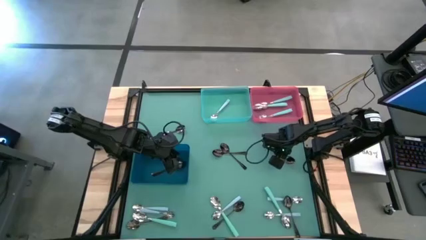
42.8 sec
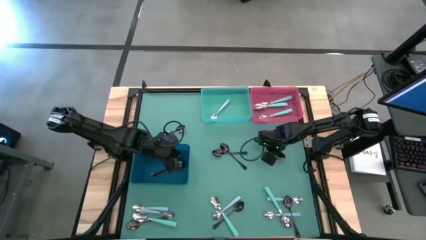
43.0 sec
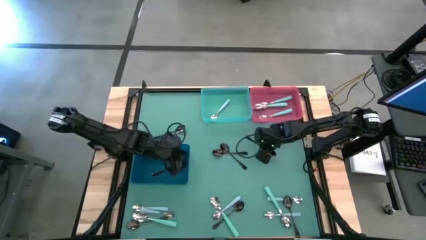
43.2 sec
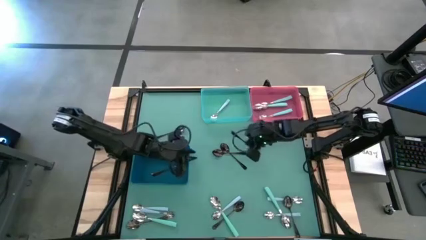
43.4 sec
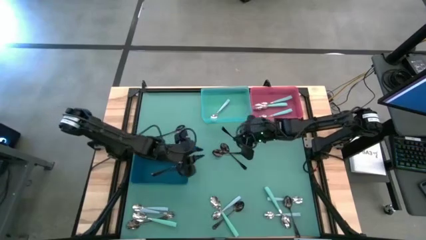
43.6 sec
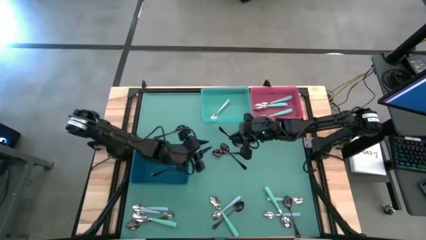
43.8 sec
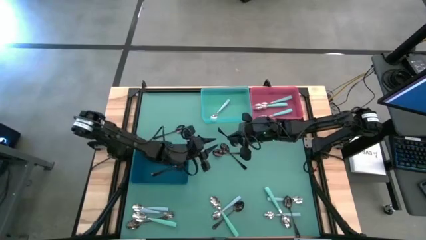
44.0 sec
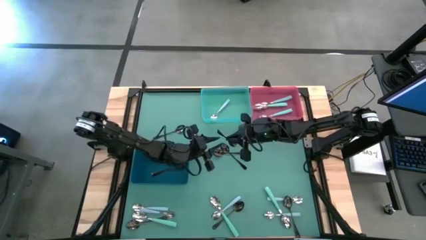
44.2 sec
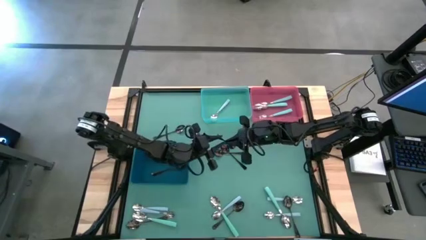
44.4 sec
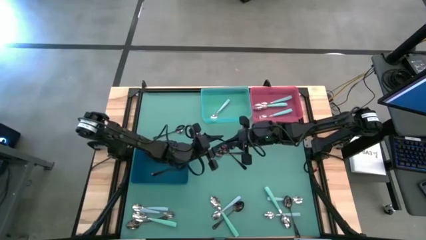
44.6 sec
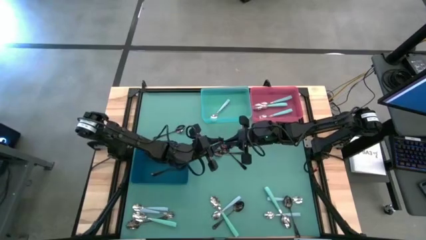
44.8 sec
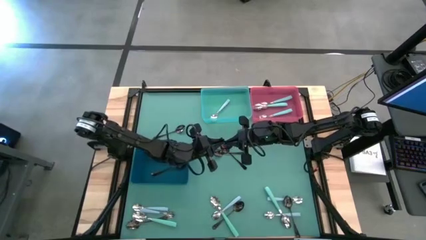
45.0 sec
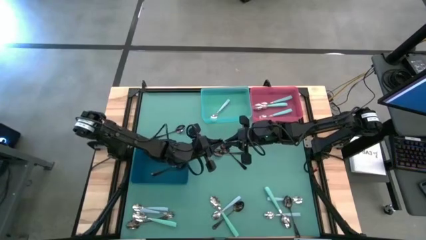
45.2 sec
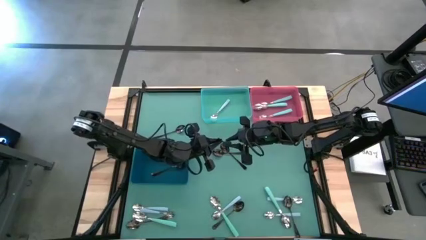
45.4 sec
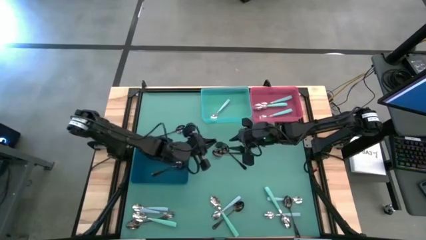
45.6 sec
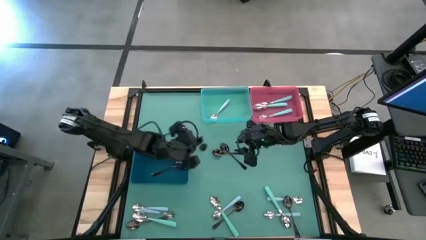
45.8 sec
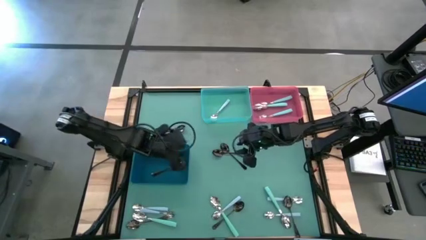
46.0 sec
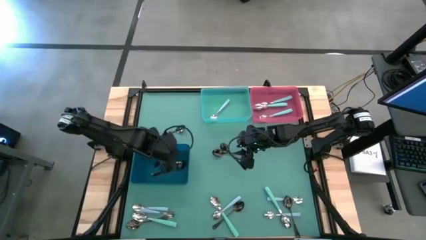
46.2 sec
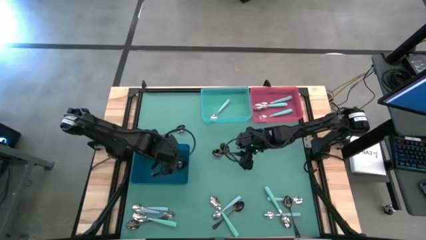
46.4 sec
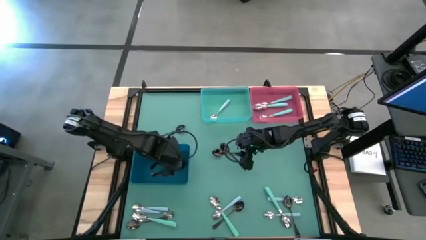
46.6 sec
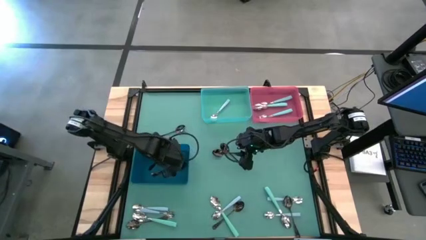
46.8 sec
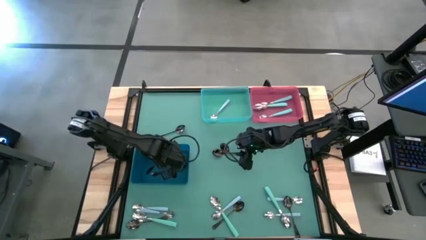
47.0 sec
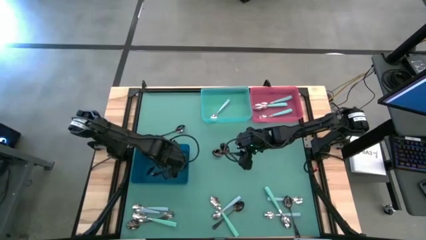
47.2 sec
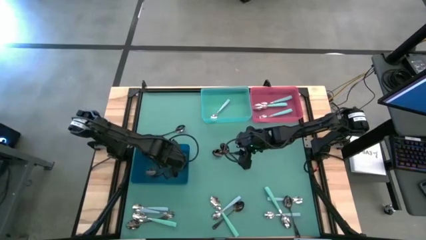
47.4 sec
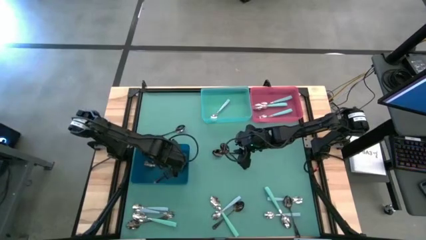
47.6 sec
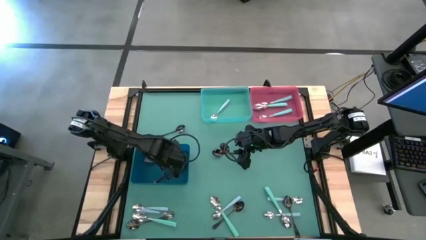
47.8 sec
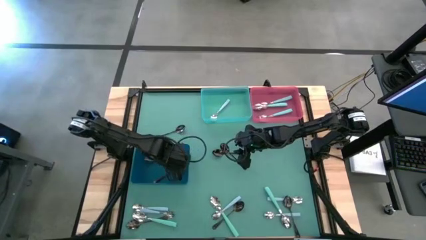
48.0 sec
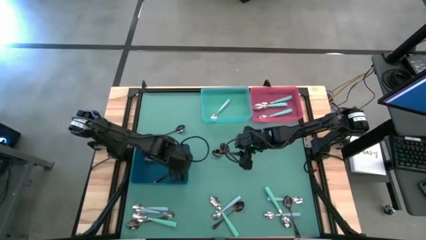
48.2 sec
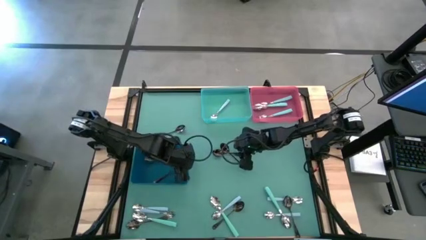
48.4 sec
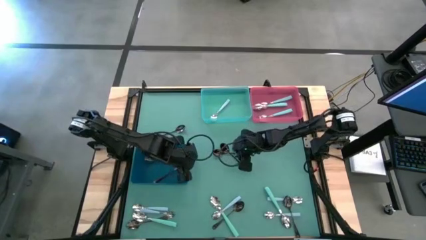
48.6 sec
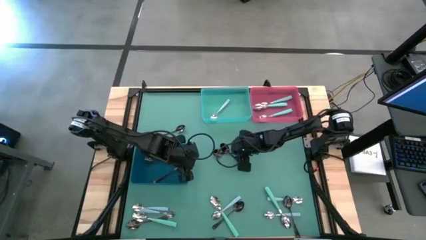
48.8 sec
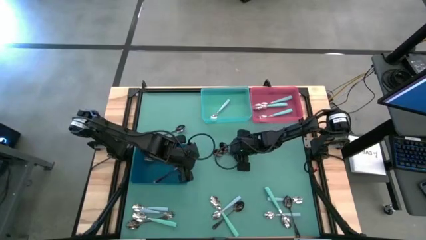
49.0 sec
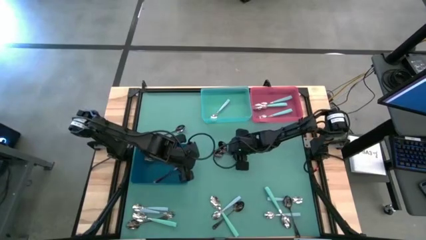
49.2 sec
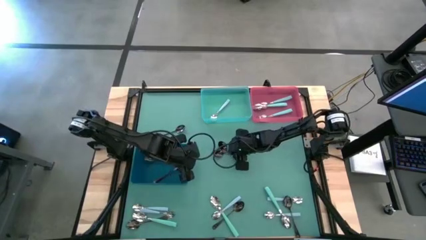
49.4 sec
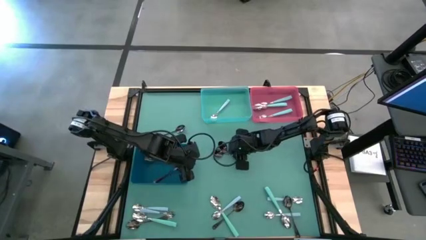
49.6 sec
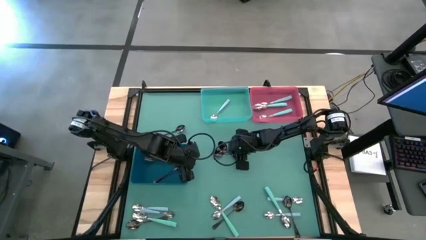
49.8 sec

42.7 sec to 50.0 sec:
Task: Sort silverware by color (type)
Put the center right black spoon into the dark blue bin

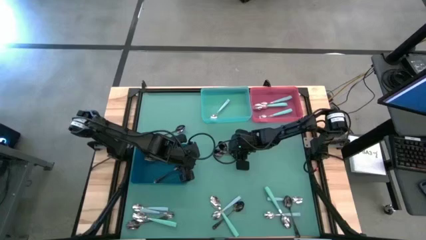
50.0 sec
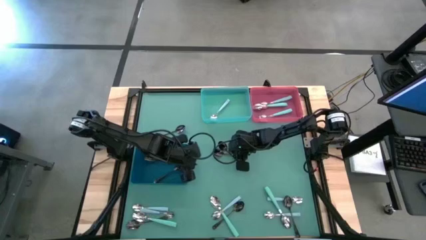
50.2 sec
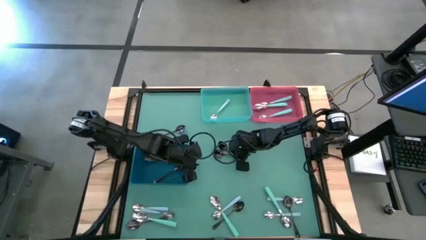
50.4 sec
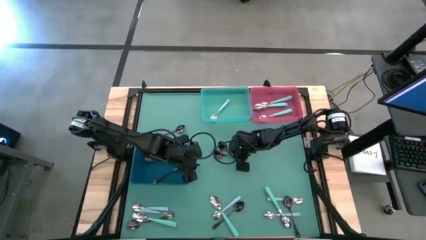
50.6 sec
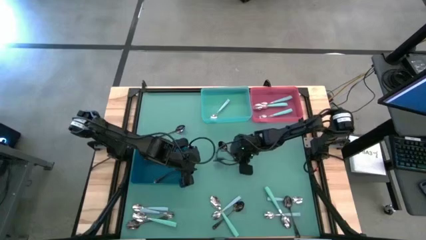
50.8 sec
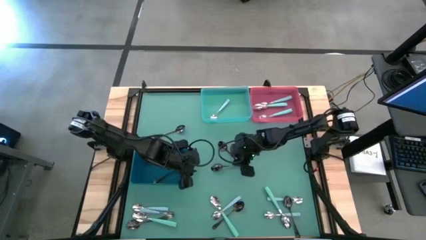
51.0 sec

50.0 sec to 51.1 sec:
Put the center black spoon into the dark blue bin

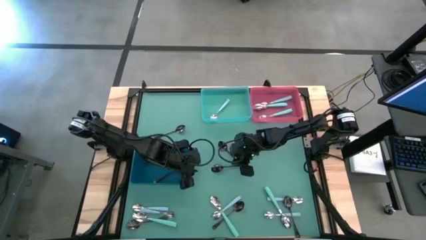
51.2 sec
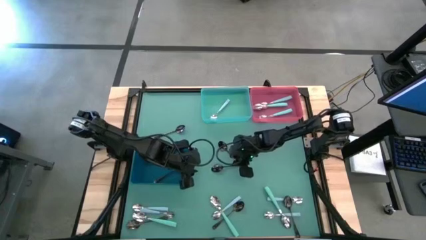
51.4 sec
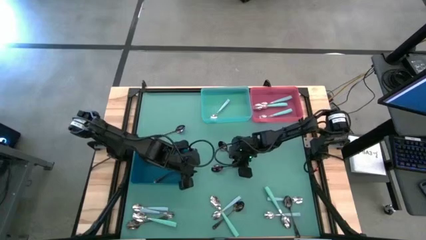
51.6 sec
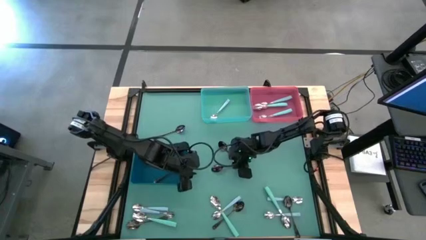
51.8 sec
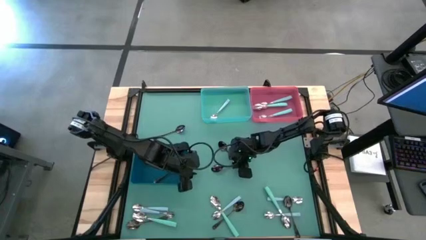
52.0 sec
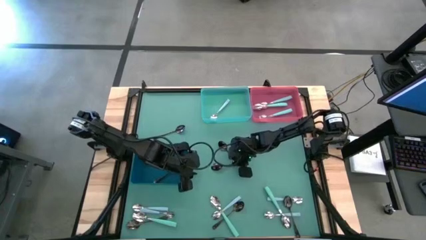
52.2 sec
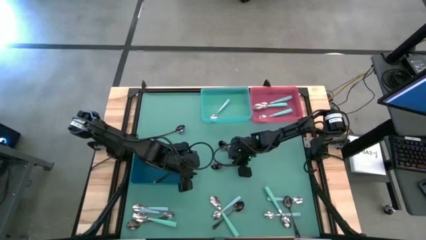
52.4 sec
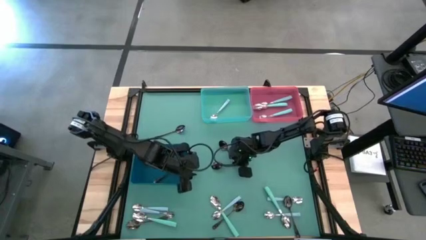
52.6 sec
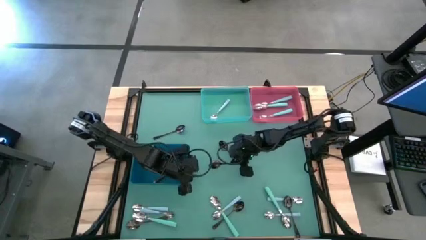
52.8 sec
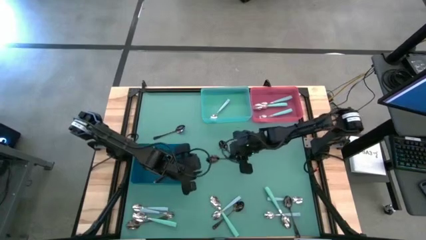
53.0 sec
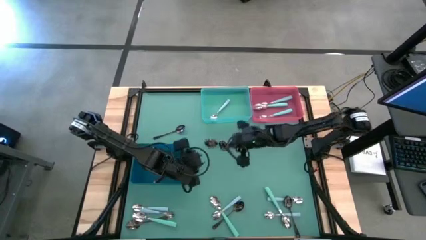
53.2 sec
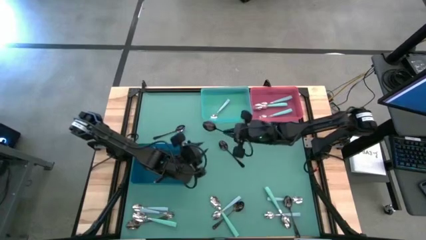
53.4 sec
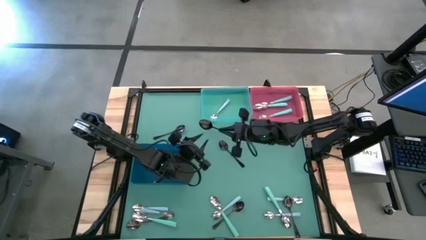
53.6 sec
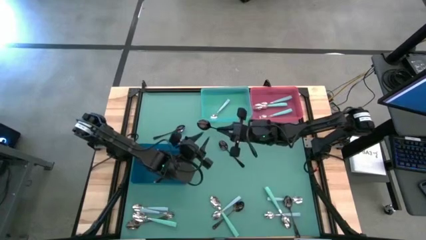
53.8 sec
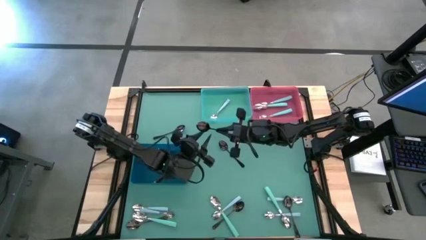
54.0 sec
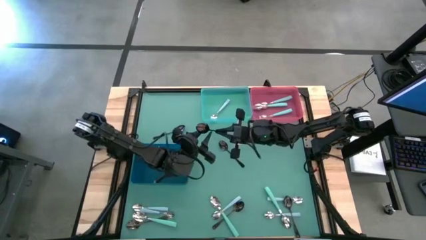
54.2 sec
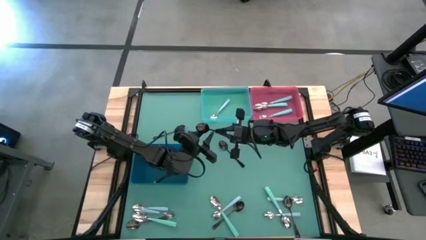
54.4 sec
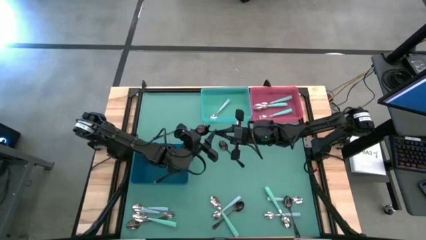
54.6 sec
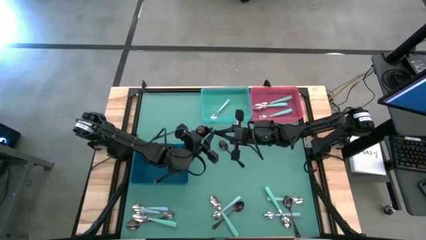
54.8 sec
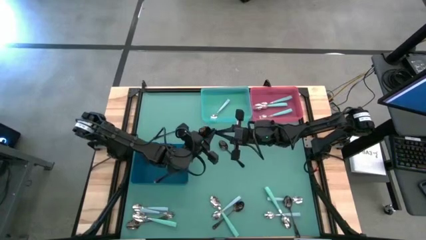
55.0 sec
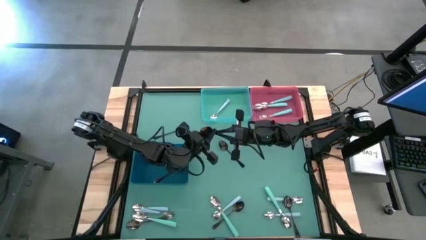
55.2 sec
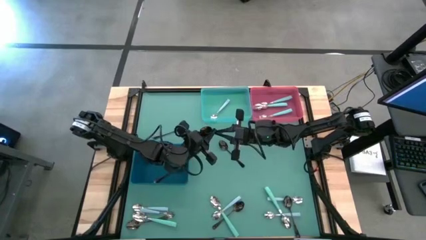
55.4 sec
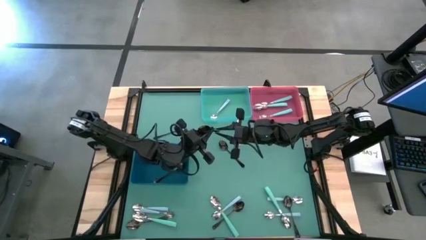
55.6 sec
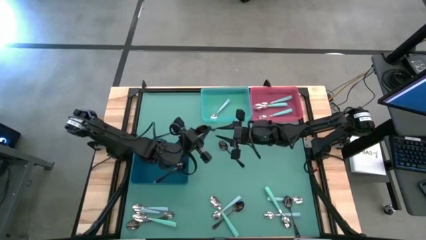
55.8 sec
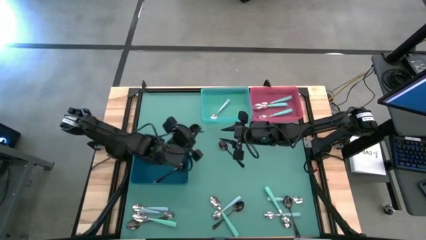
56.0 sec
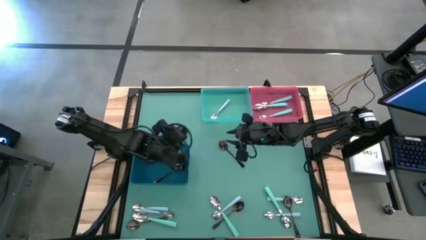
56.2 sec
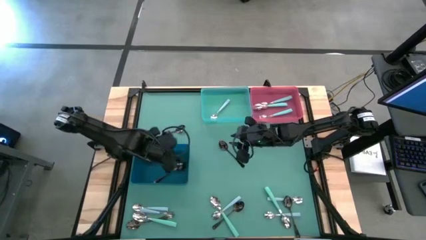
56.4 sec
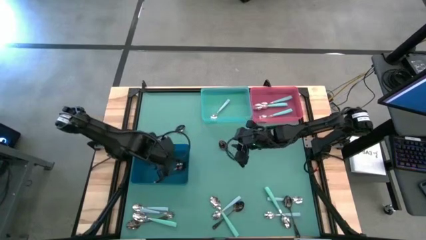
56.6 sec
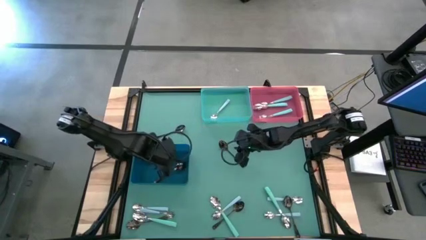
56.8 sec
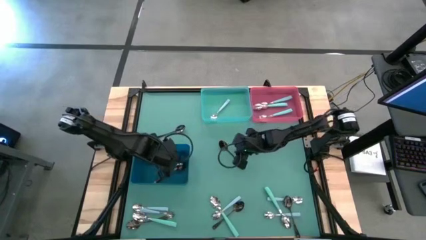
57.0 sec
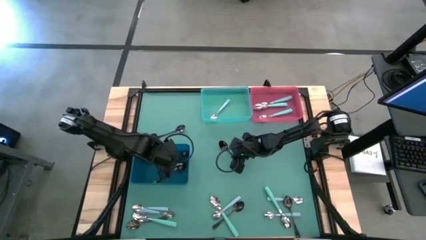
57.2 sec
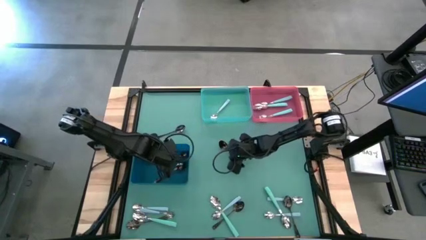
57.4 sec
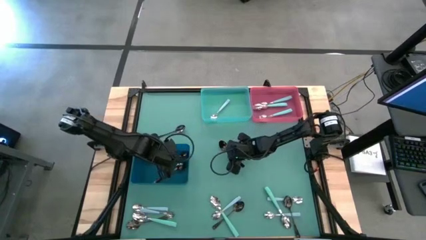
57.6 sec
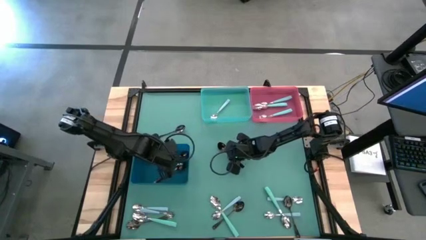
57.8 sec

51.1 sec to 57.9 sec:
Put the center black spoon into the dark blue bin
